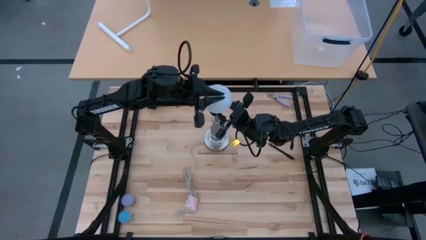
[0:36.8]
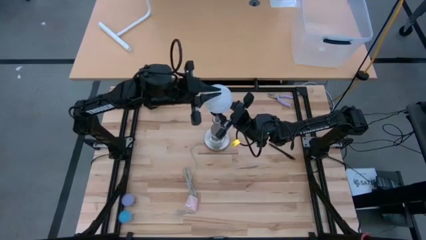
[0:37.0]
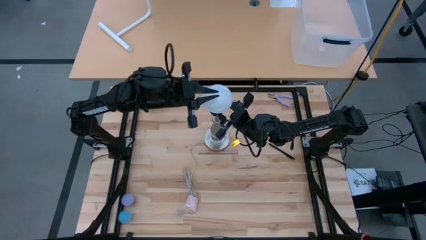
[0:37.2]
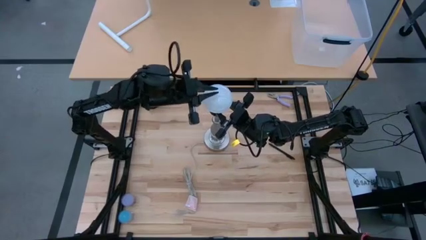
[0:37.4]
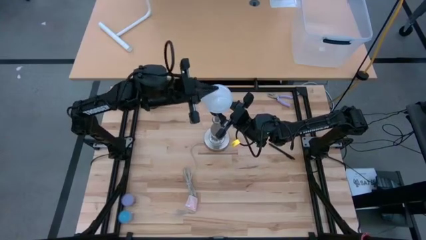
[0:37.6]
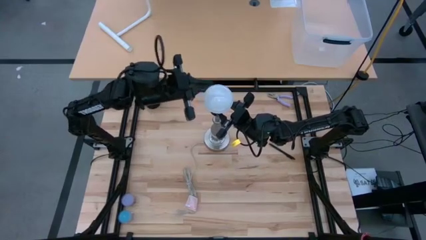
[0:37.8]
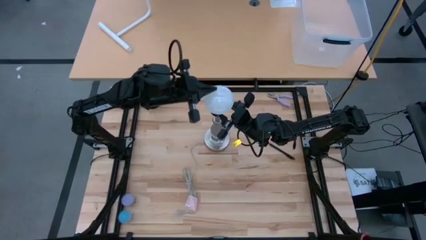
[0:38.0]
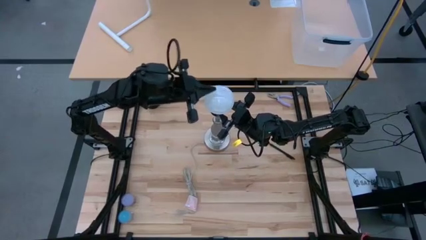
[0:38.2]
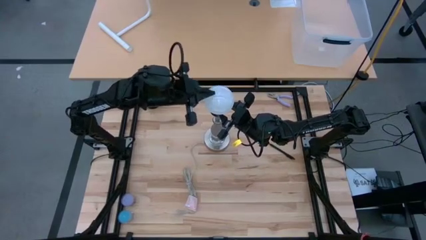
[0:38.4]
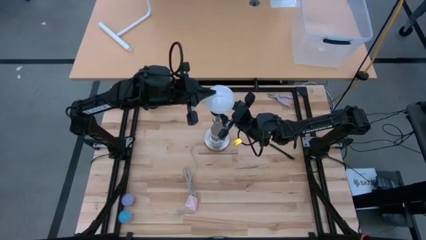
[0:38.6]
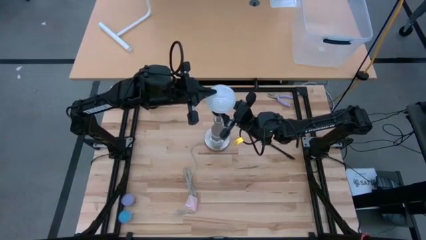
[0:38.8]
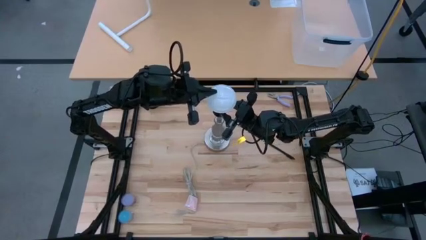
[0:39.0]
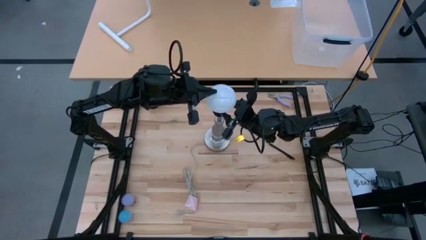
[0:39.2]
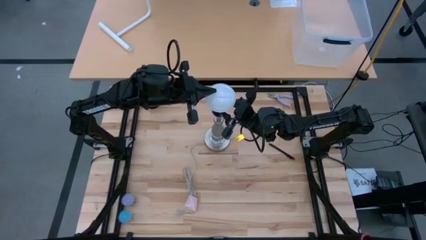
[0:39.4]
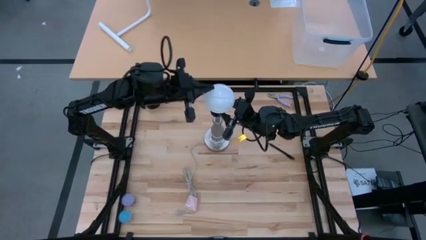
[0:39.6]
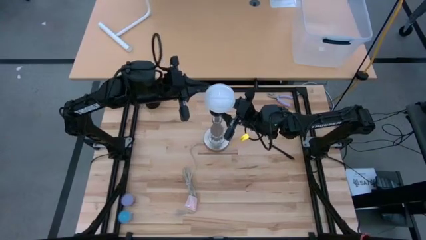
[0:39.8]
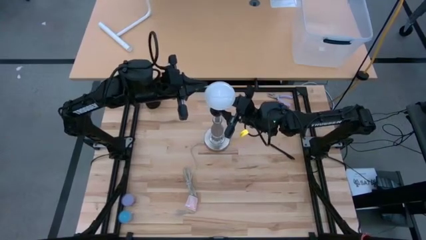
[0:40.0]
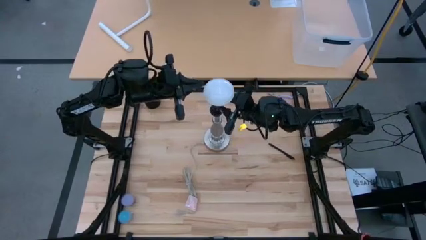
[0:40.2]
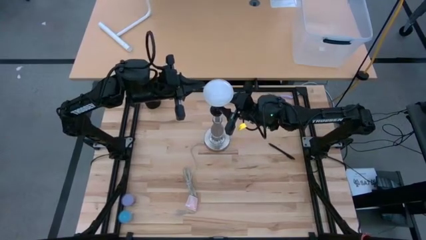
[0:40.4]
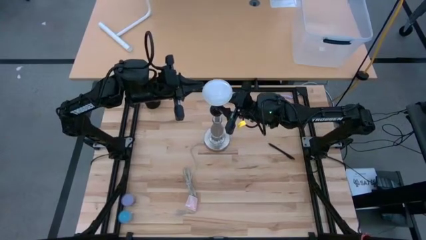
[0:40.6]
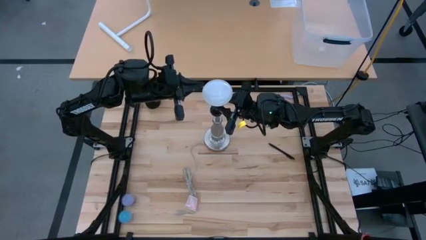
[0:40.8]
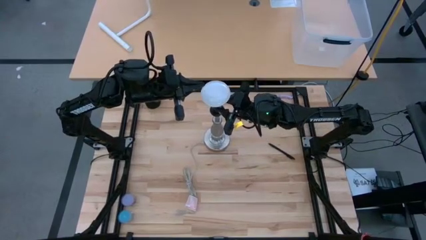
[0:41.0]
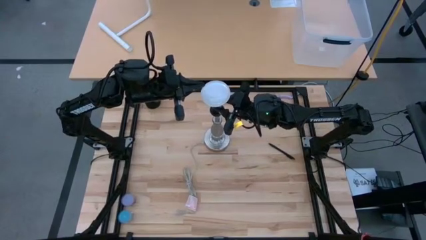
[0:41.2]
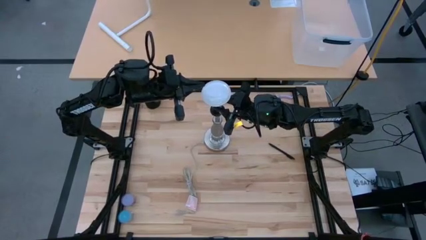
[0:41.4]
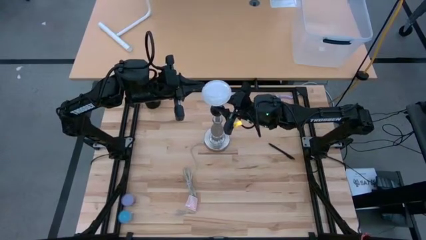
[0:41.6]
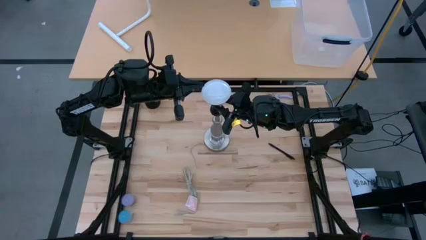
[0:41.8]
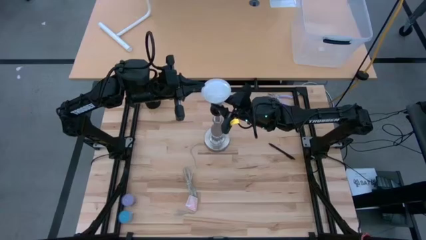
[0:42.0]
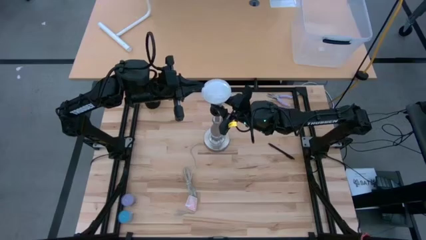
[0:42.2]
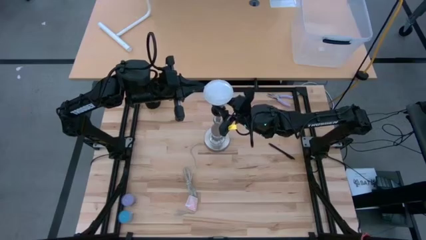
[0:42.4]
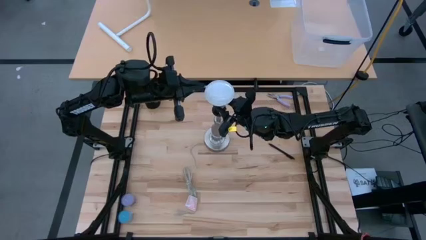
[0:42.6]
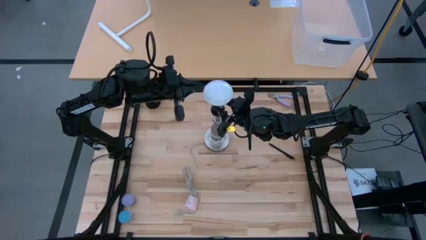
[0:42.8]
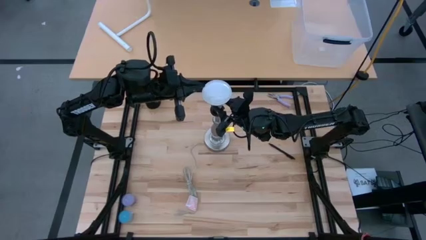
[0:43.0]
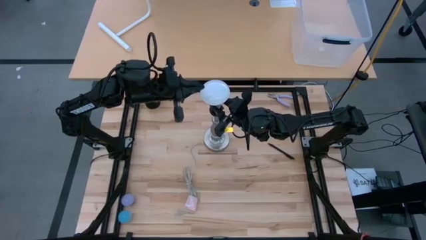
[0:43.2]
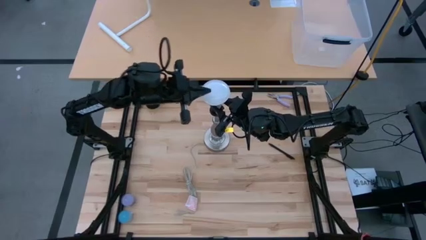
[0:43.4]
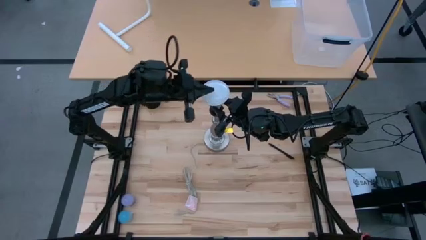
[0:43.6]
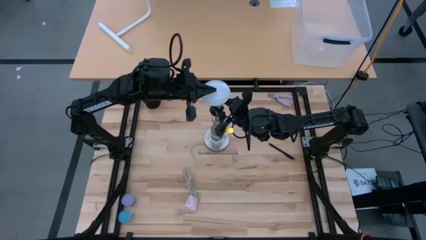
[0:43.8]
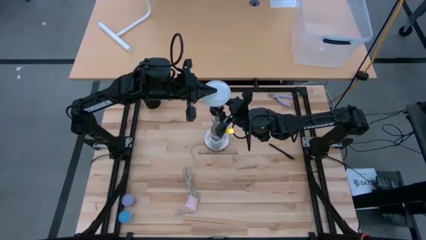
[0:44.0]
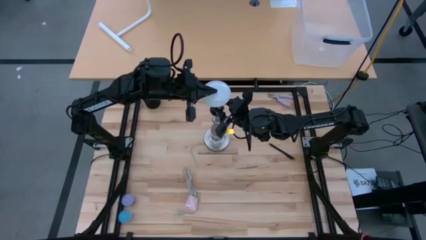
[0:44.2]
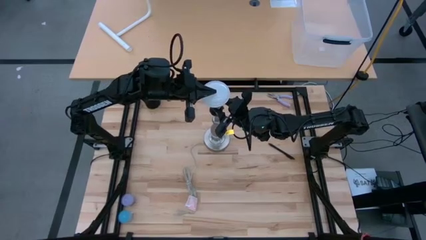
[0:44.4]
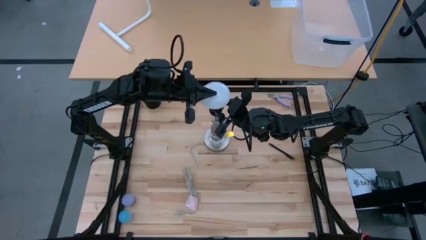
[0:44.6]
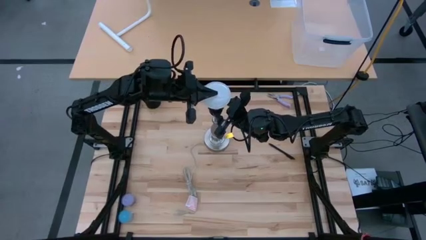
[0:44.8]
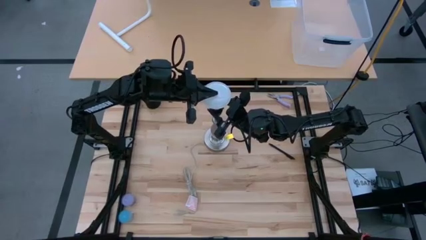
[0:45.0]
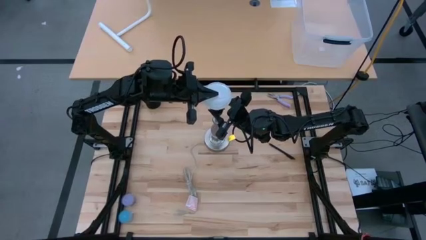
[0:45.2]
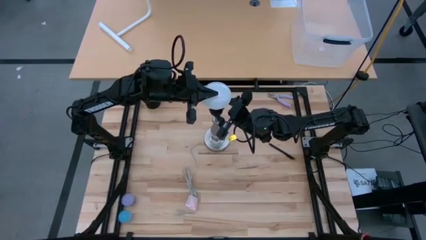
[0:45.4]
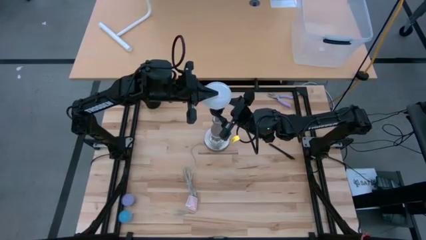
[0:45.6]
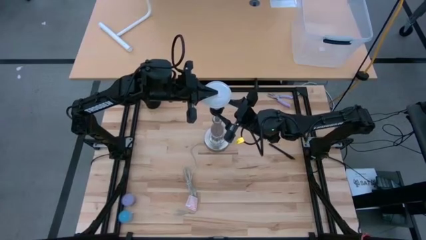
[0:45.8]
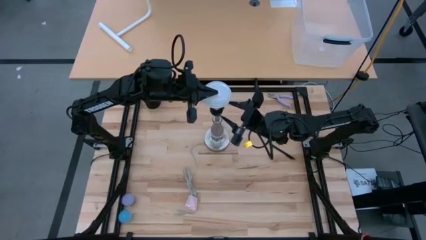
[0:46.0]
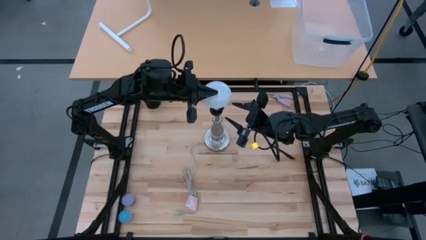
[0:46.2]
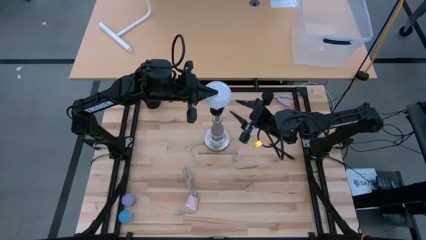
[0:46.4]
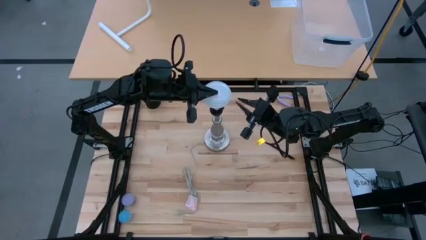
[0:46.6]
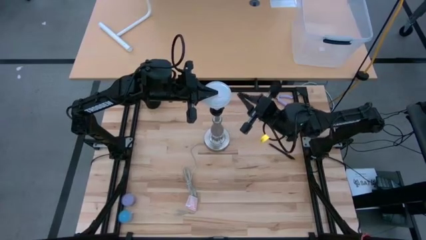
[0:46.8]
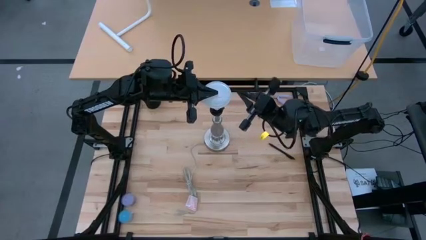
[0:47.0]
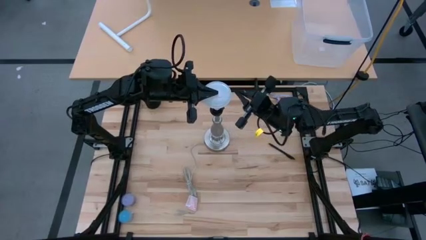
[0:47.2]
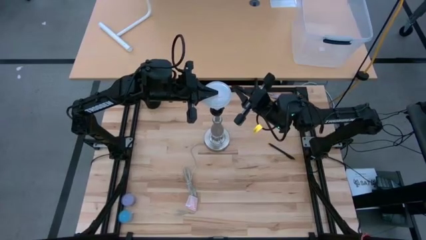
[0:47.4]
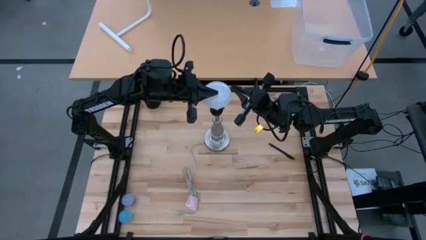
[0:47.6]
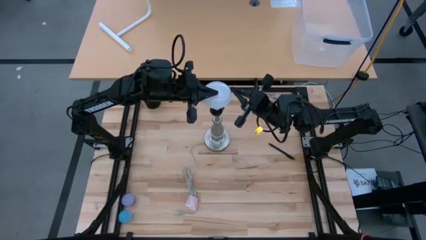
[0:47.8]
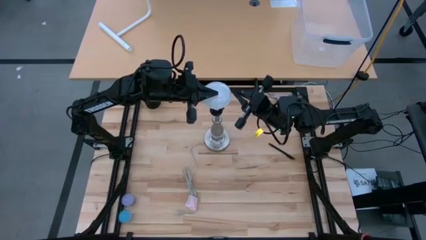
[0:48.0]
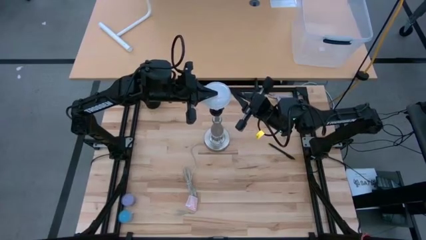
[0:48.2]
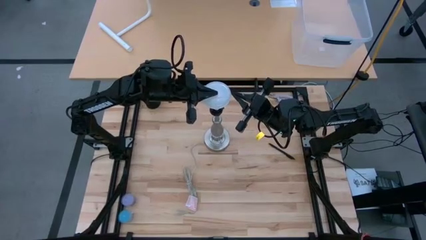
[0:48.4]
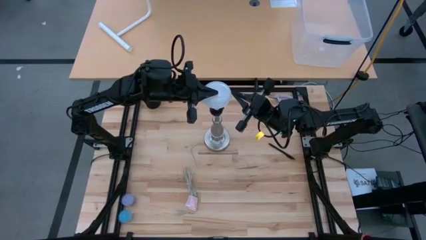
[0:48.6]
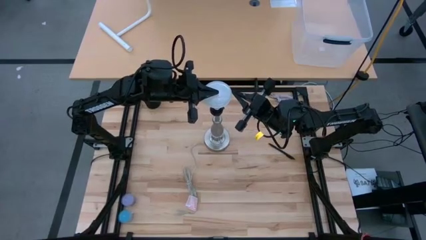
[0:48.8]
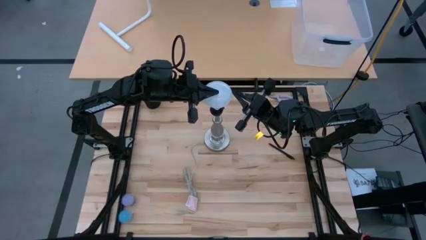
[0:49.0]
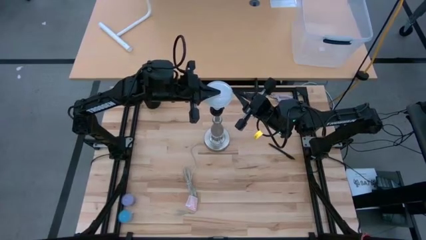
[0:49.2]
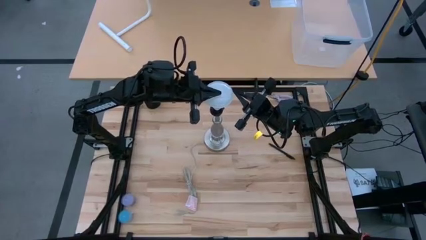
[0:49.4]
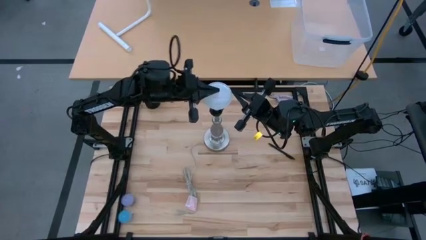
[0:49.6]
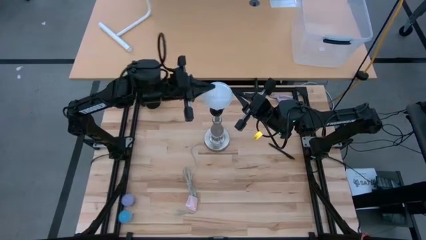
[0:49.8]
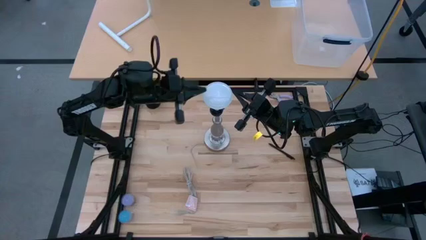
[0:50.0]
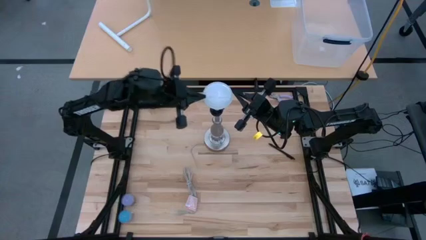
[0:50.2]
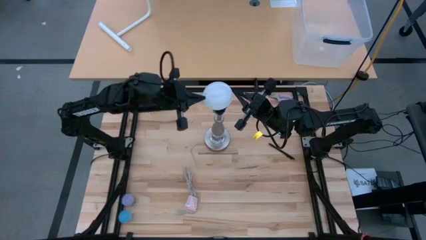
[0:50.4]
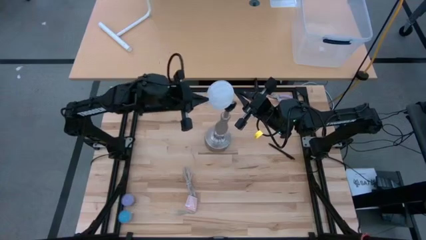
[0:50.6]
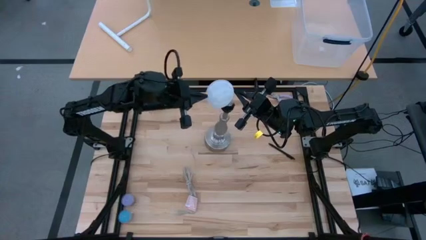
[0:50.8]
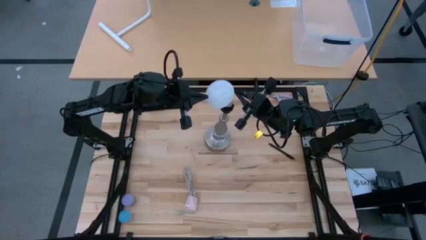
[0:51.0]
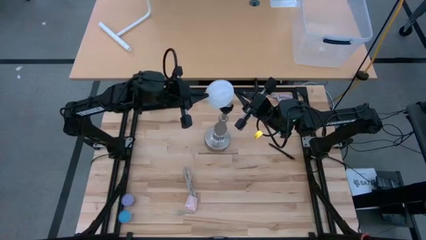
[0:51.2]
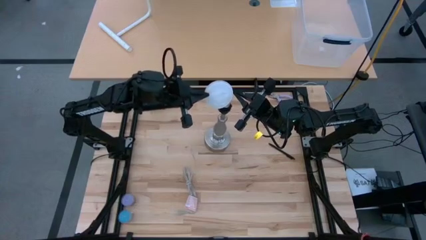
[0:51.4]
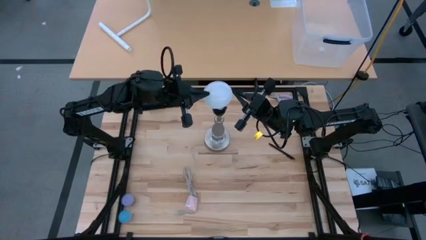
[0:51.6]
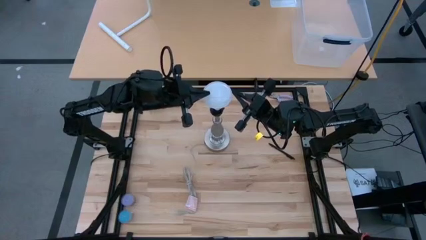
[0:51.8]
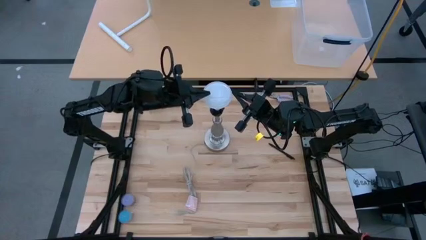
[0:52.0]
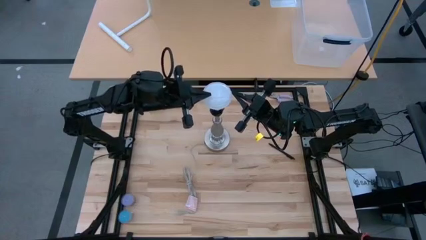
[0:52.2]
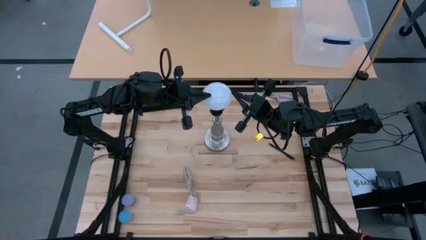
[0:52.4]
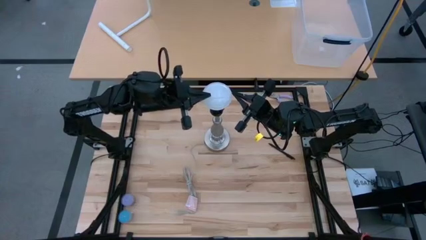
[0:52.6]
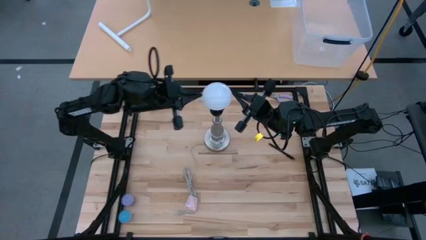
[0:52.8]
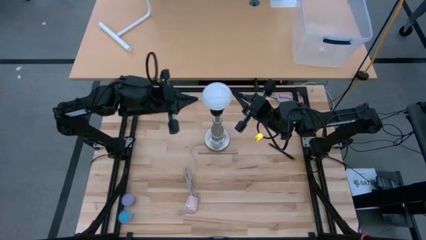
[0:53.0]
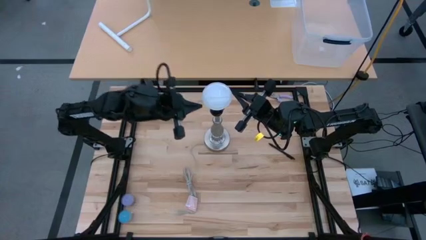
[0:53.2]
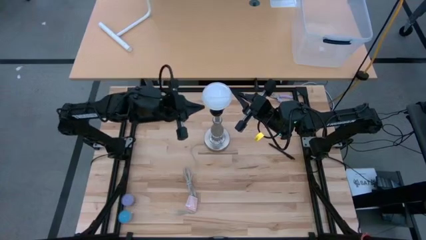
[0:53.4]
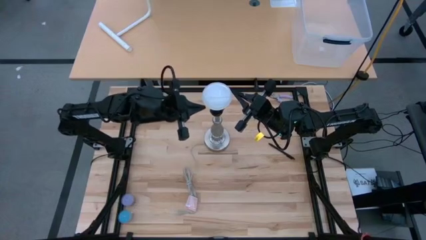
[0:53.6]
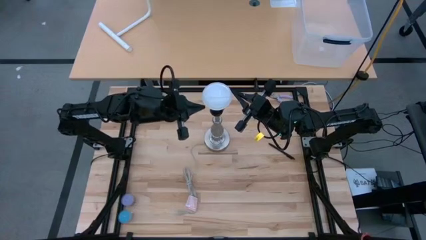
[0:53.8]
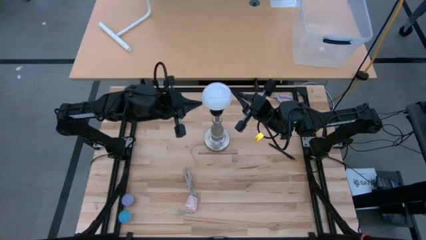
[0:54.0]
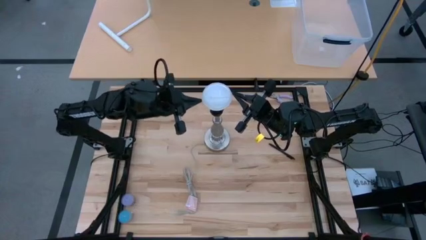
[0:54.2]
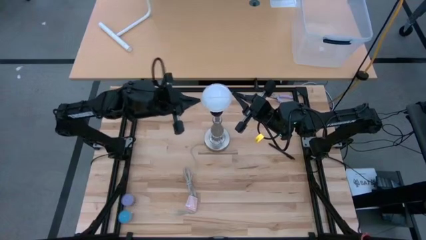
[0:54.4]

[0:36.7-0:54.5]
Task: Screw lightbulb
Insert the lightbulb into the lamp
